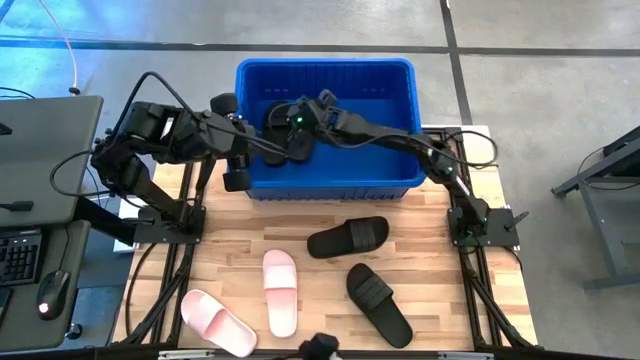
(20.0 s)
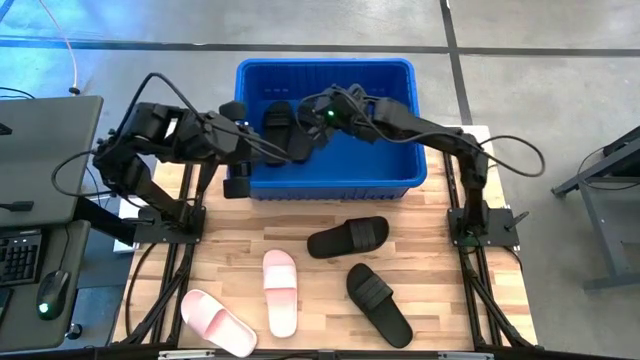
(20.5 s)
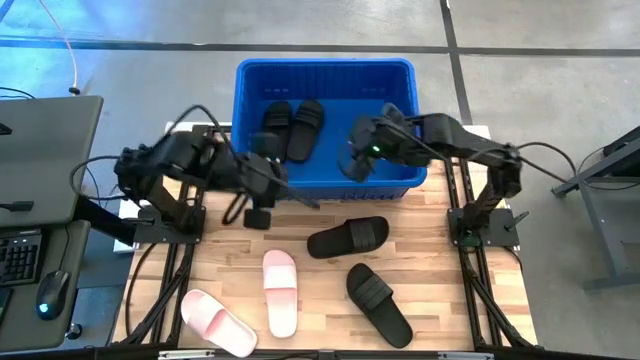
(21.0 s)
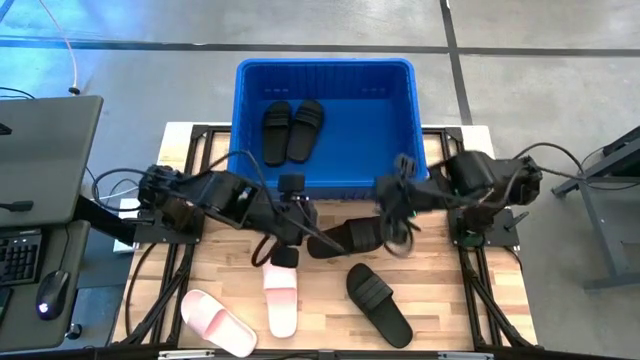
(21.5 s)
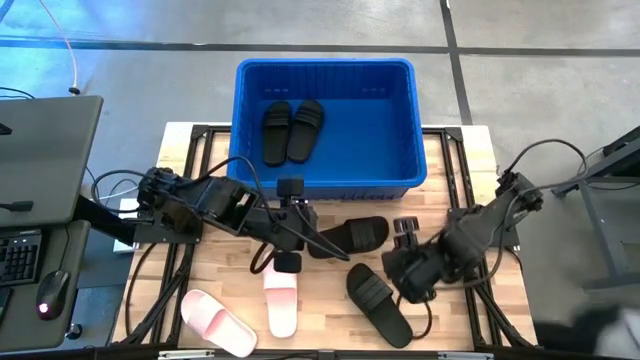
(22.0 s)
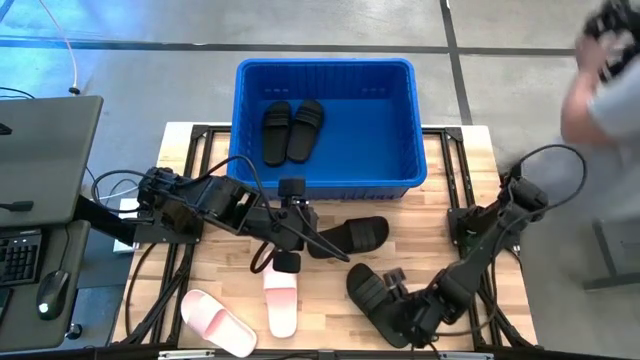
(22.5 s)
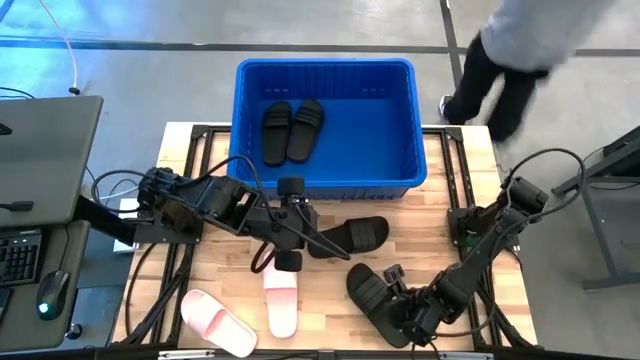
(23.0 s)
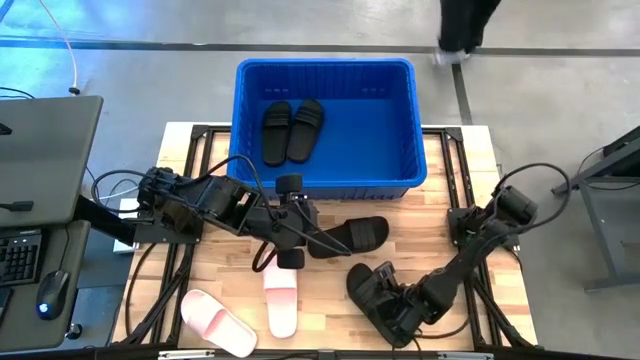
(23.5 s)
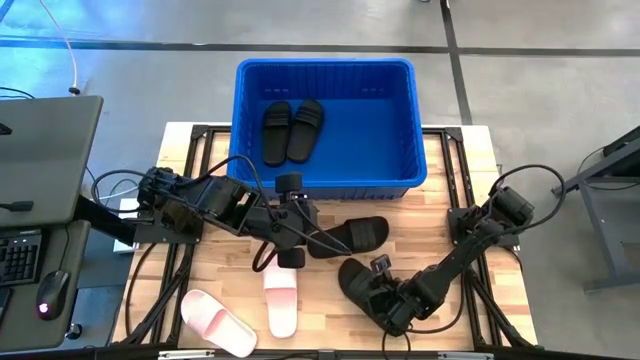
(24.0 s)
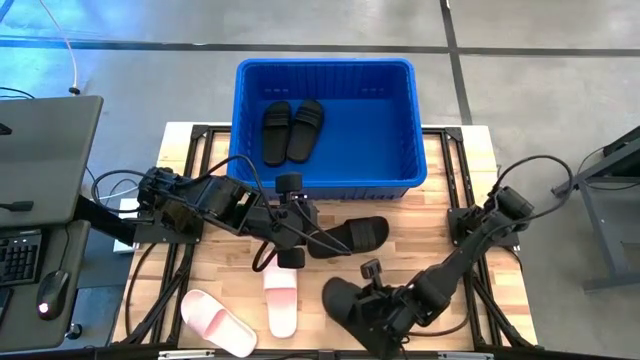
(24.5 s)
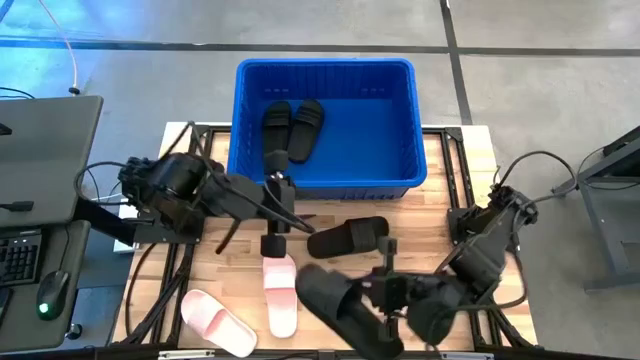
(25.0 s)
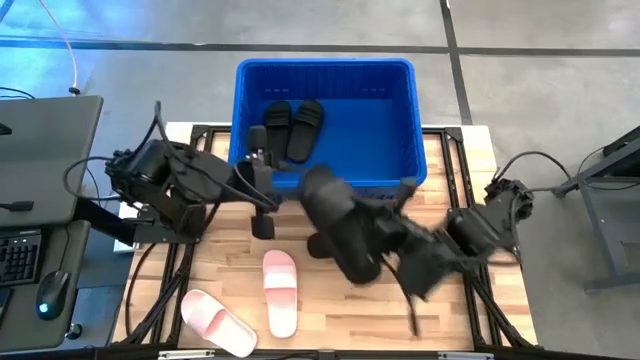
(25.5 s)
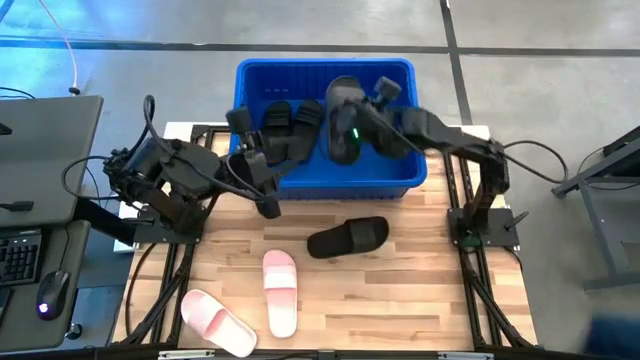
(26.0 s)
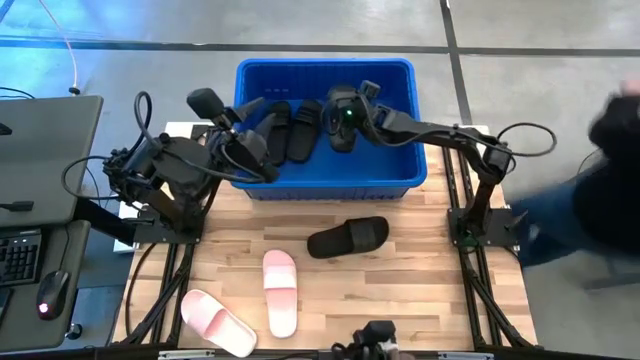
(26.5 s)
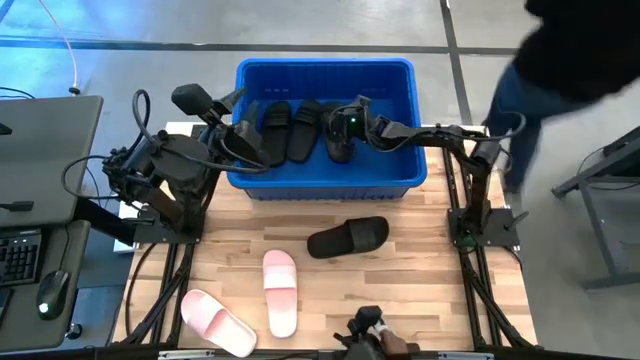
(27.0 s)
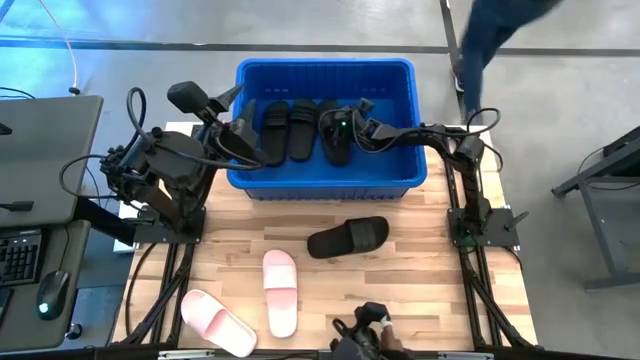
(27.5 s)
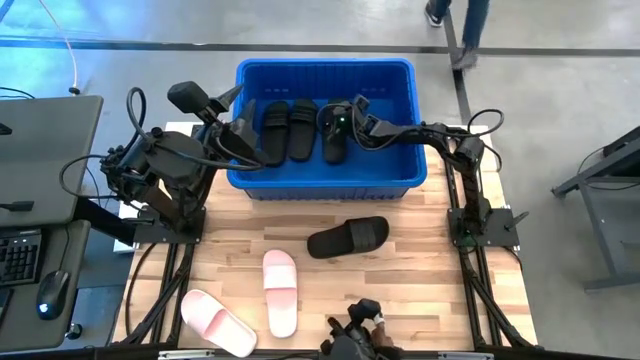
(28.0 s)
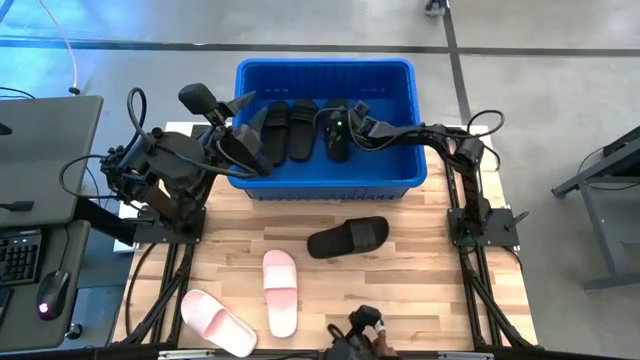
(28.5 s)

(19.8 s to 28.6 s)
Task: Pick and place slides into bin
Put the black slide into the blue bin

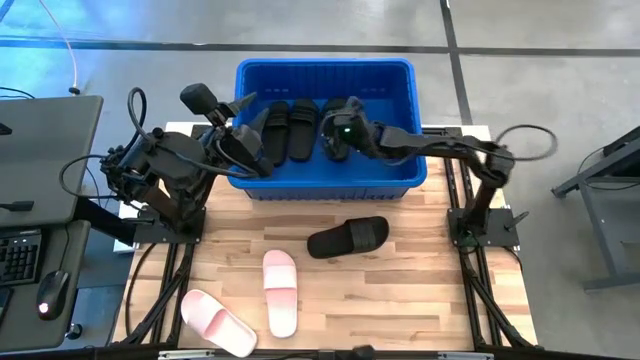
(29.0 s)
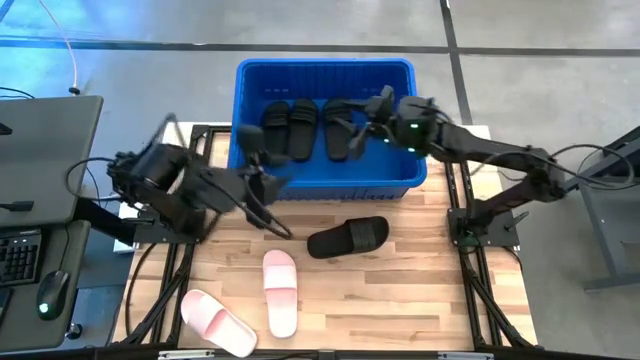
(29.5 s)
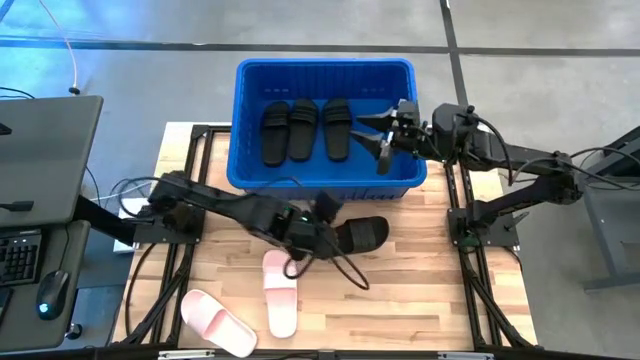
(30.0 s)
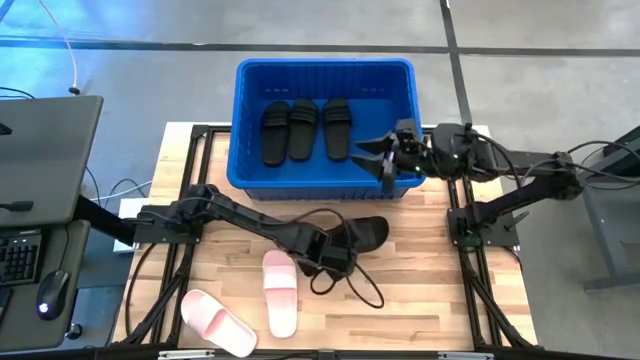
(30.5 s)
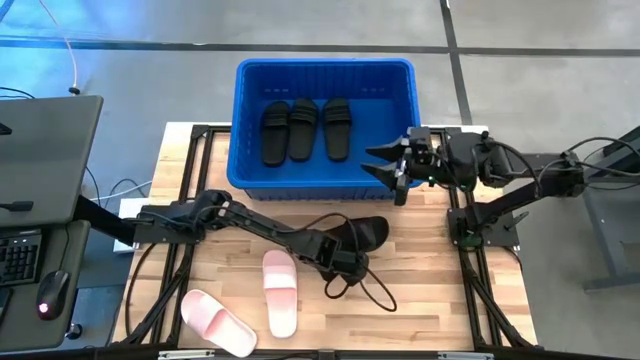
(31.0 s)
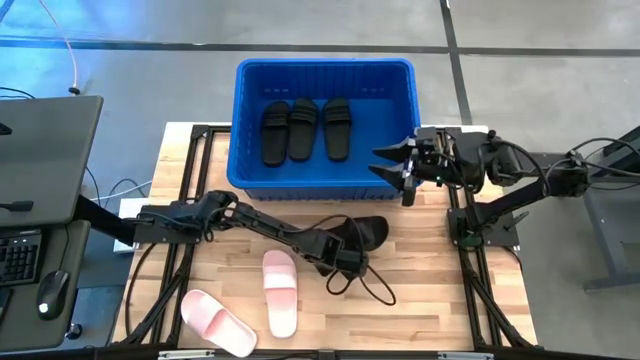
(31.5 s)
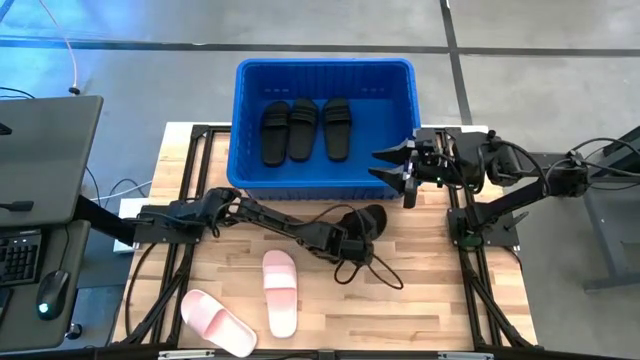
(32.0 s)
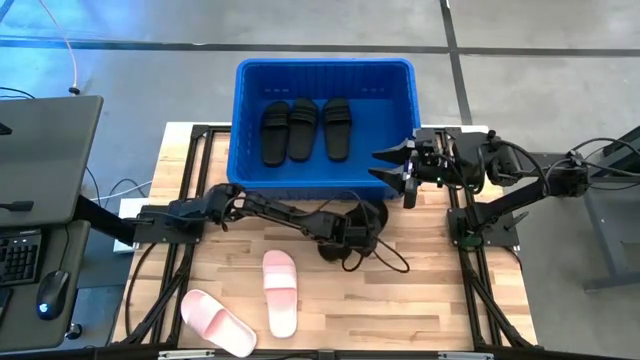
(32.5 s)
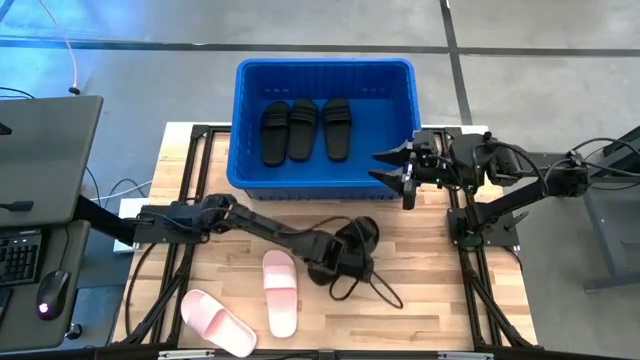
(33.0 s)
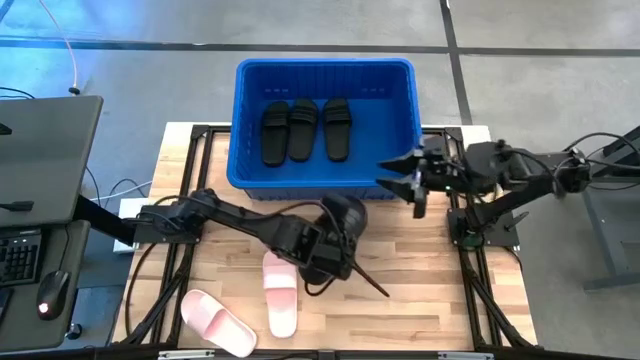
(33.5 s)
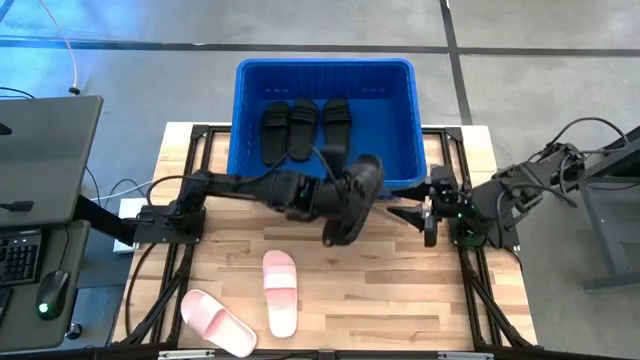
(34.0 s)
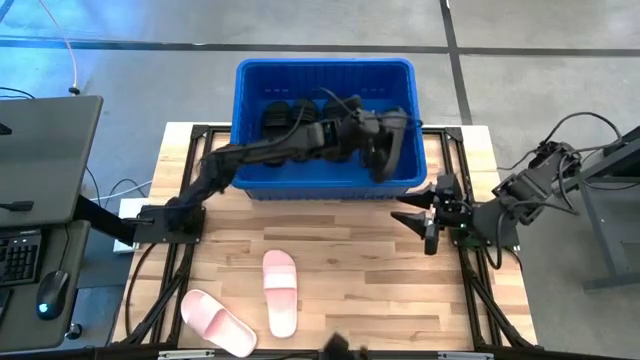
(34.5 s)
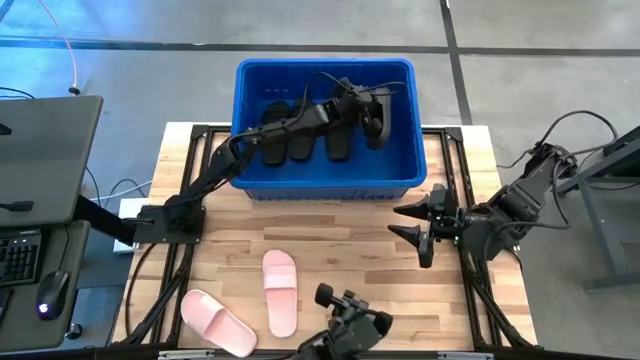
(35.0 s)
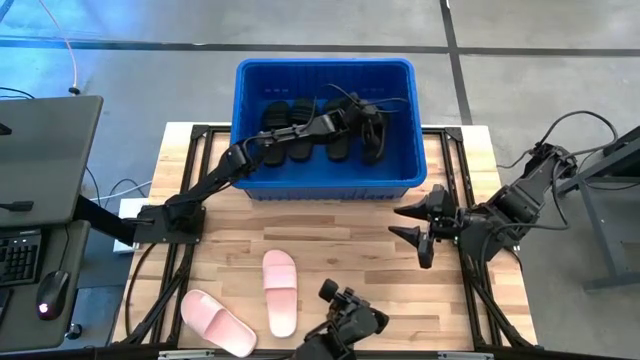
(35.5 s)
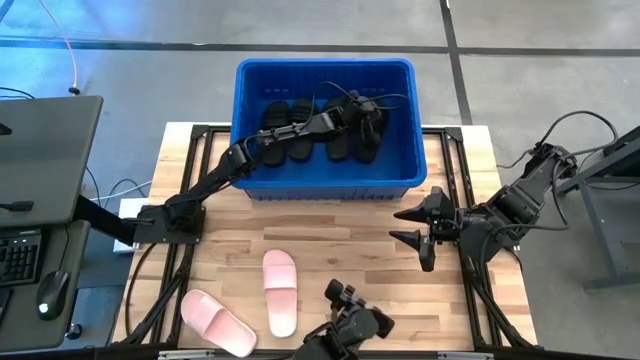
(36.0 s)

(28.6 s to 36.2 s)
Put the black slide into the blue bin

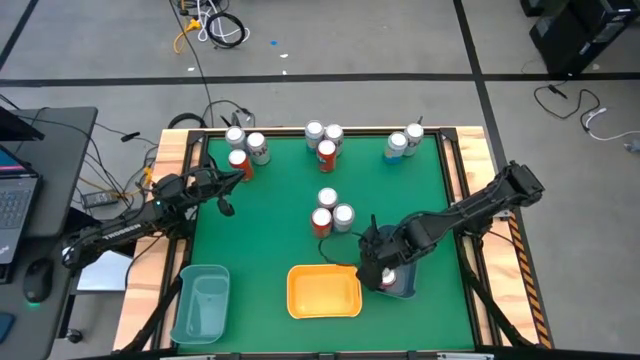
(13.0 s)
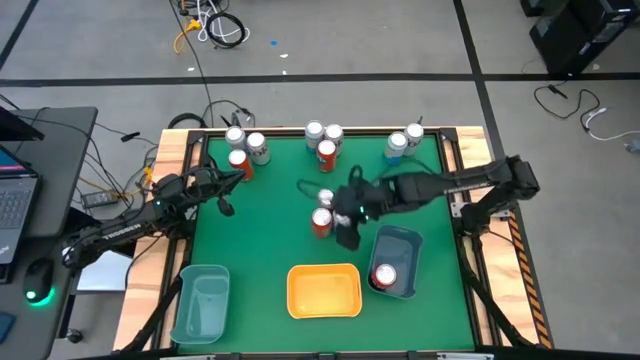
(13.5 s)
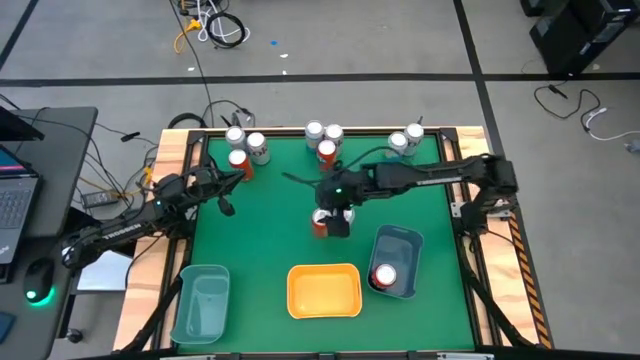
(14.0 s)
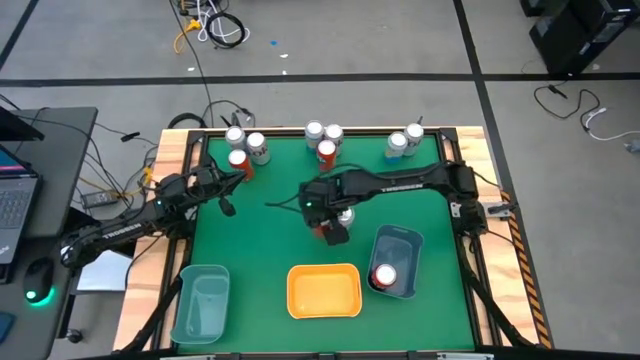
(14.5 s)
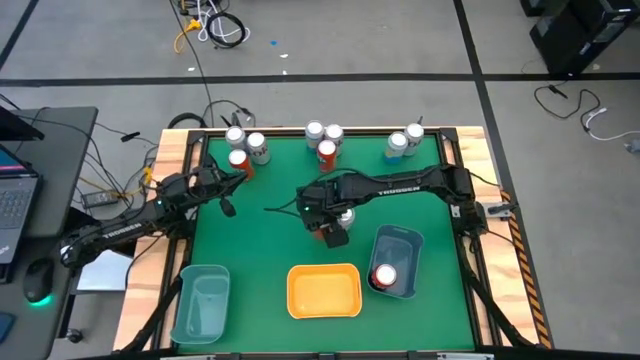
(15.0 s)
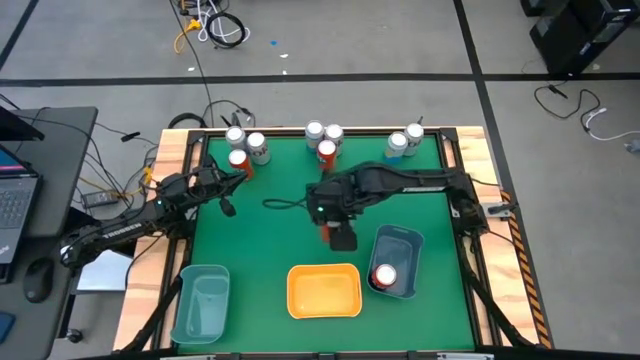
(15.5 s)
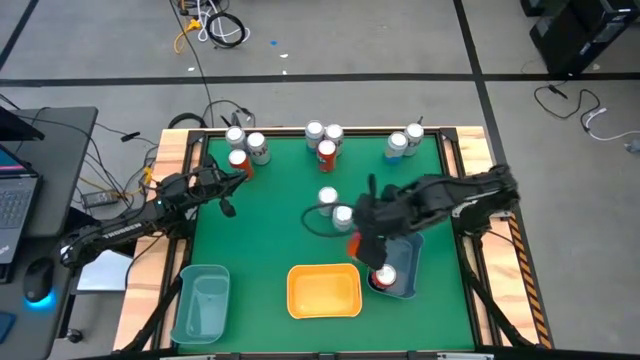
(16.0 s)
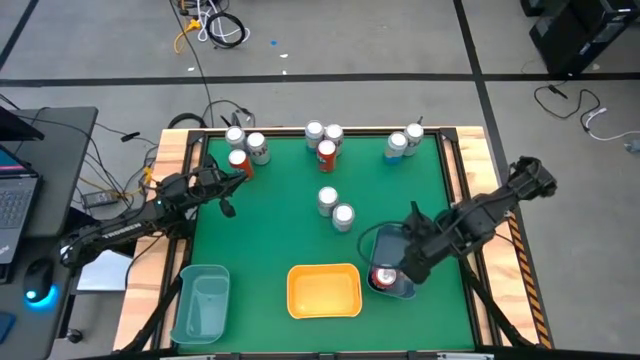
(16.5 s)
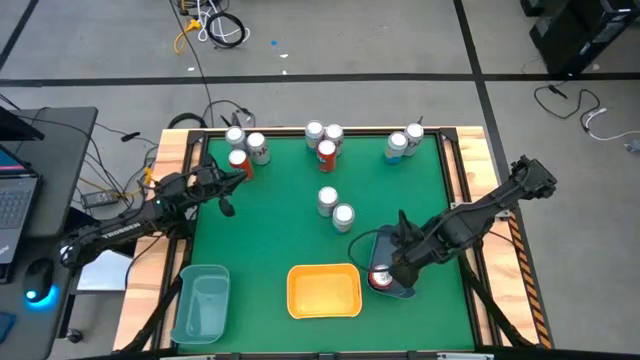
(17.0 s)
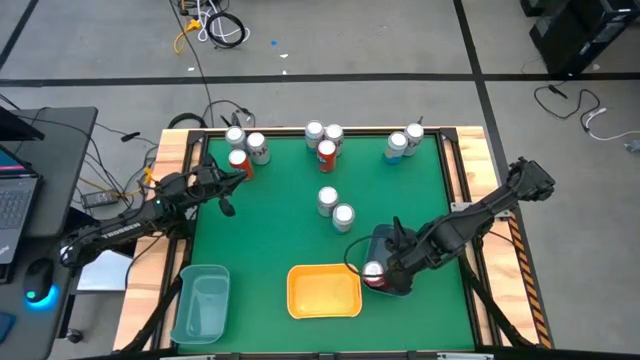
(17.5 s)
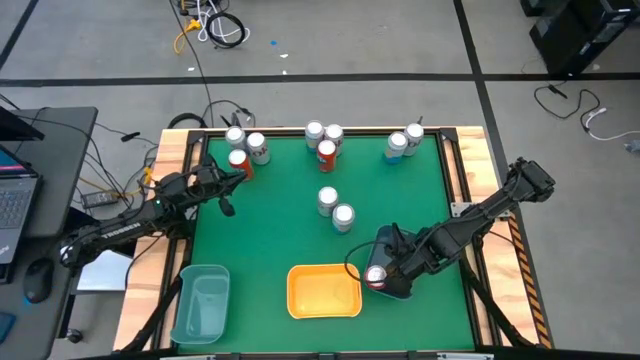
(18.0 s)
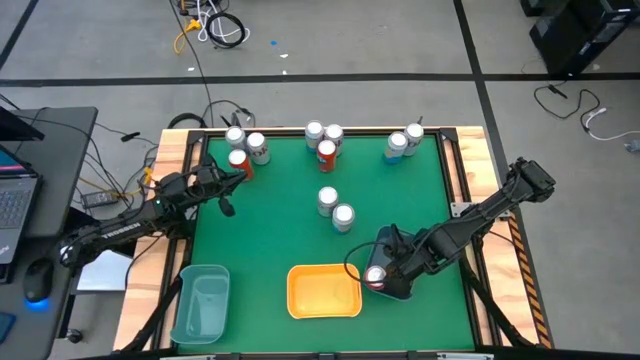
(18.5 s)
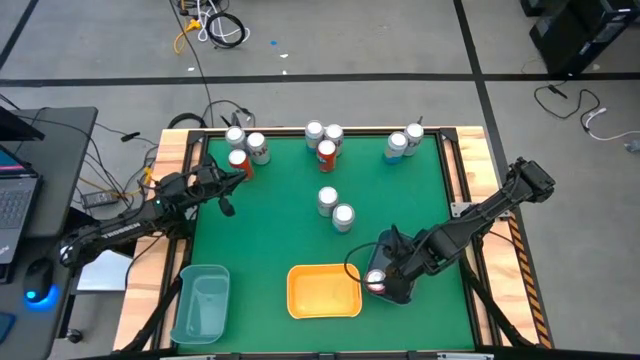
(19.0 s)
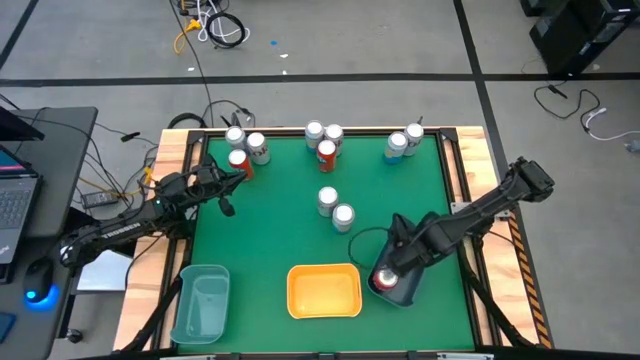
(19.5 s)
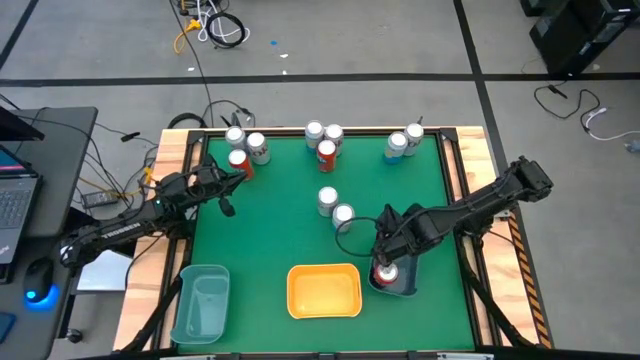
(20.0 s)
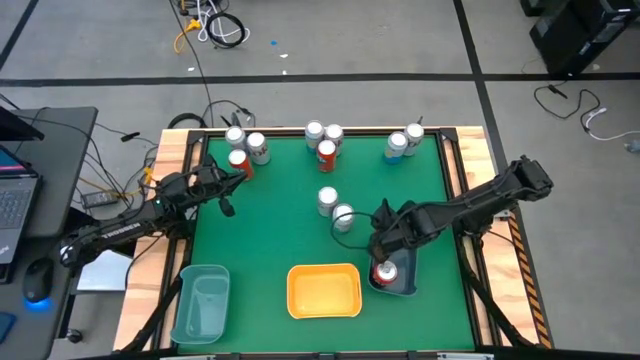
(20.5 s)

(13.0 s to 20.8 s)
Task: Sort soda cans
Put the red soda can into the blue bin
